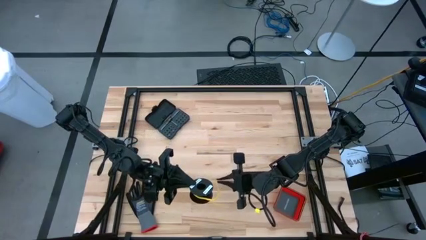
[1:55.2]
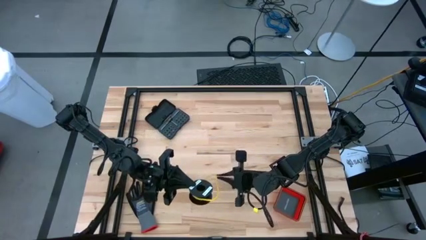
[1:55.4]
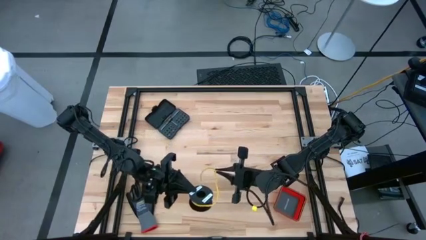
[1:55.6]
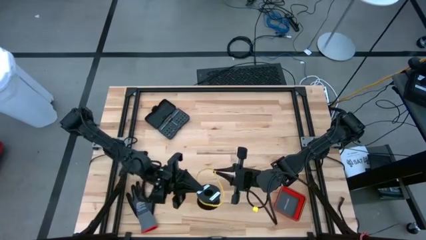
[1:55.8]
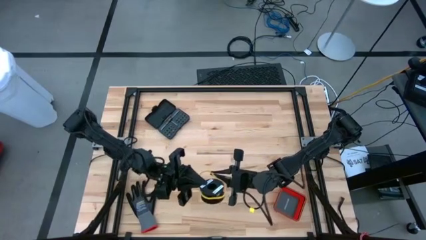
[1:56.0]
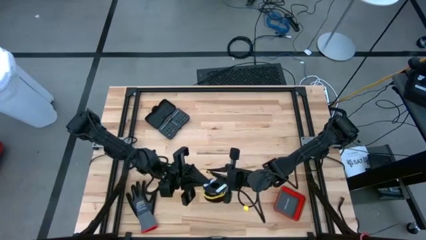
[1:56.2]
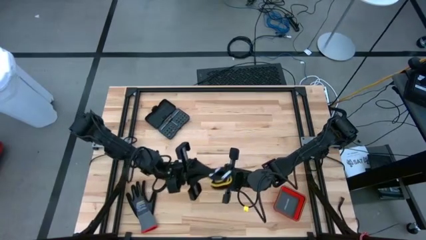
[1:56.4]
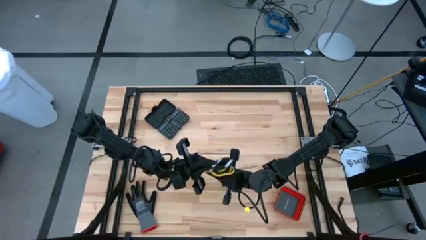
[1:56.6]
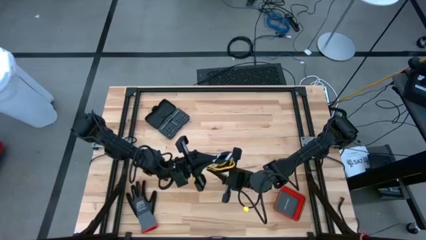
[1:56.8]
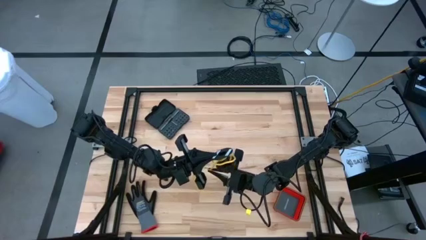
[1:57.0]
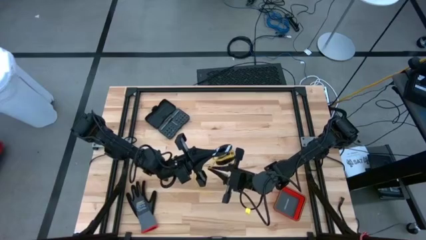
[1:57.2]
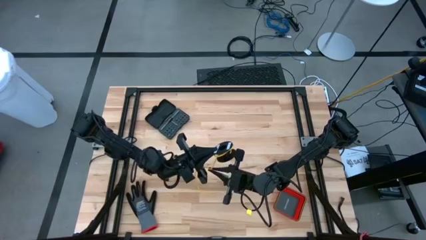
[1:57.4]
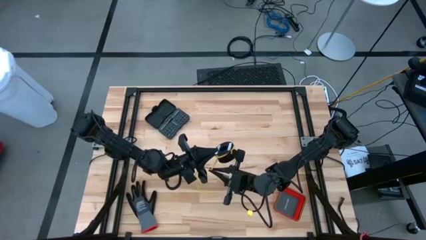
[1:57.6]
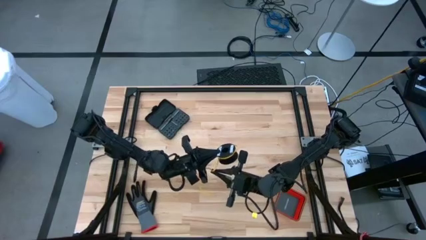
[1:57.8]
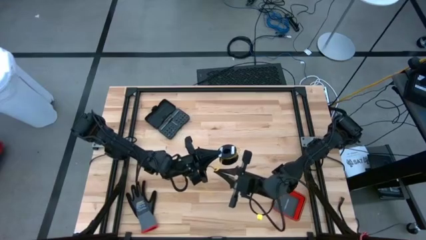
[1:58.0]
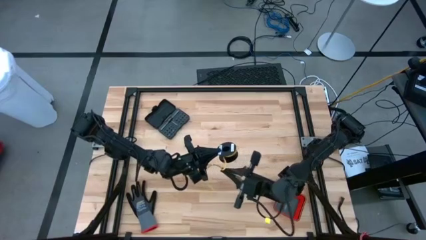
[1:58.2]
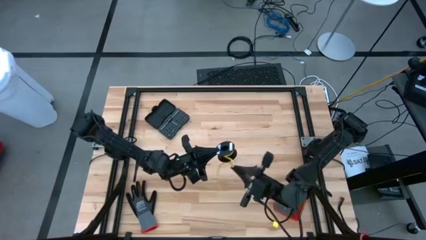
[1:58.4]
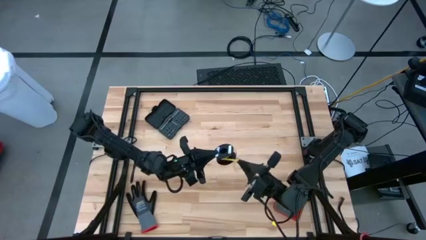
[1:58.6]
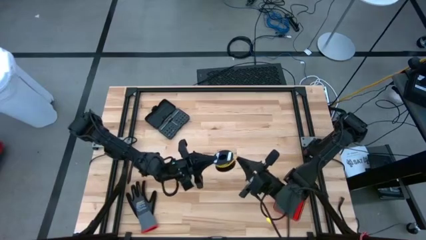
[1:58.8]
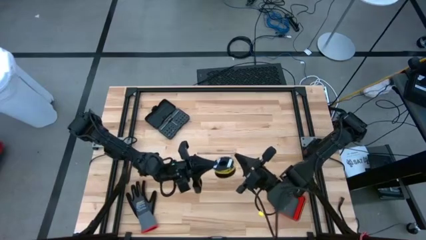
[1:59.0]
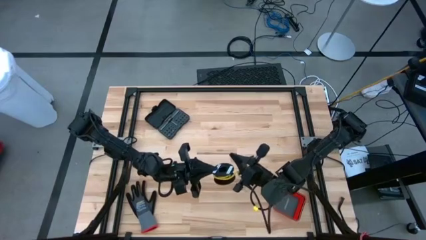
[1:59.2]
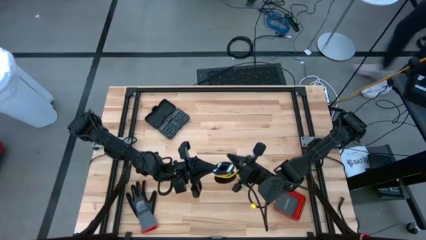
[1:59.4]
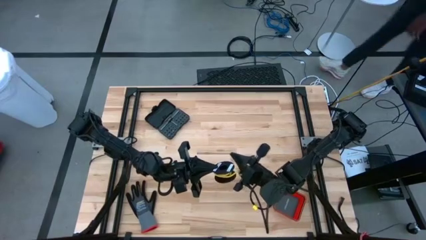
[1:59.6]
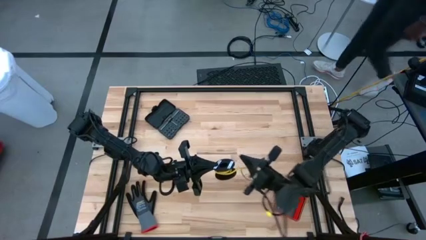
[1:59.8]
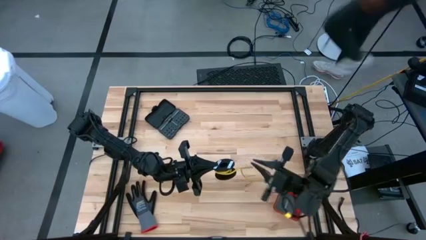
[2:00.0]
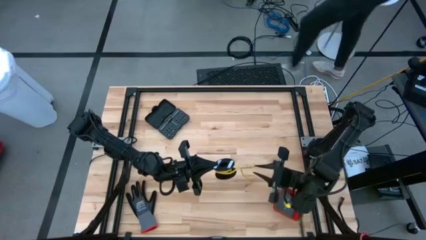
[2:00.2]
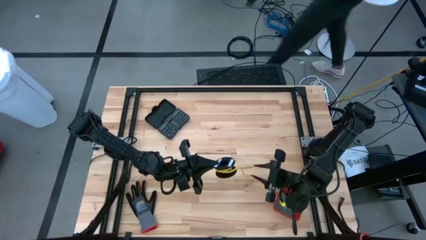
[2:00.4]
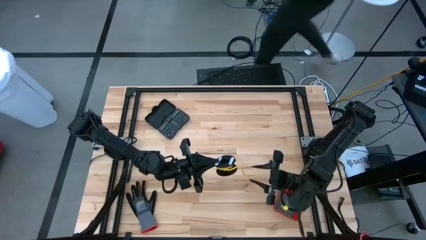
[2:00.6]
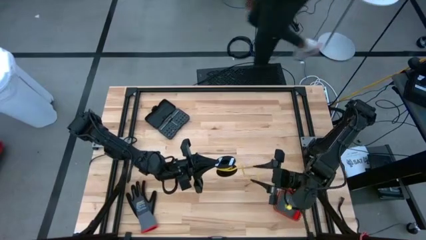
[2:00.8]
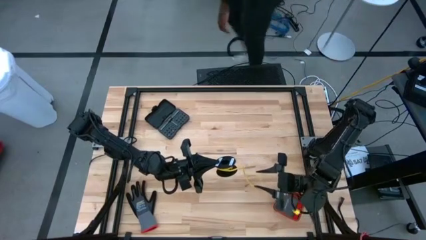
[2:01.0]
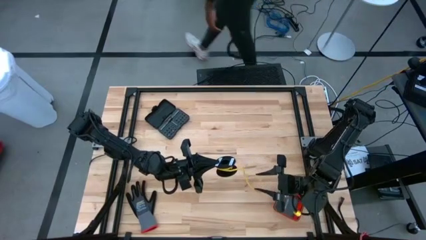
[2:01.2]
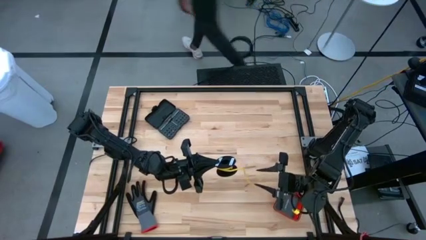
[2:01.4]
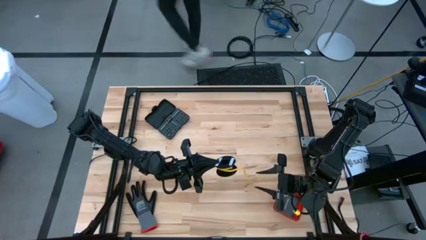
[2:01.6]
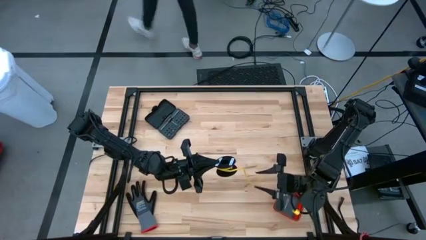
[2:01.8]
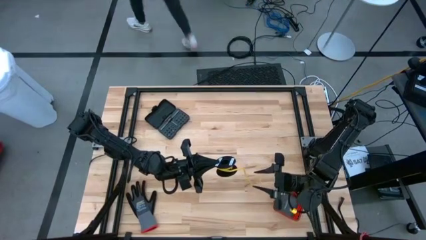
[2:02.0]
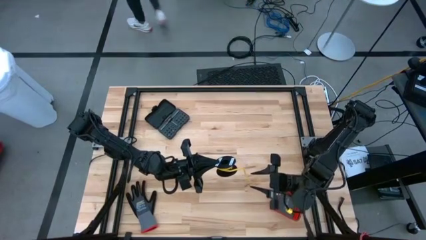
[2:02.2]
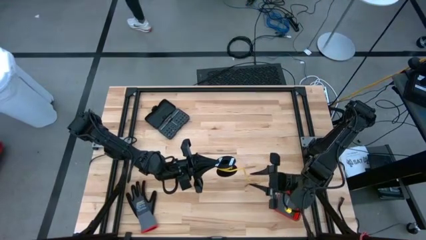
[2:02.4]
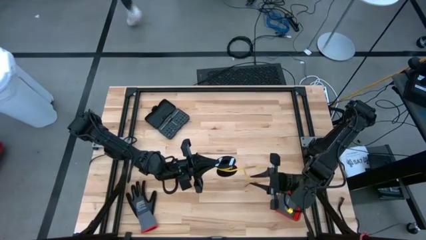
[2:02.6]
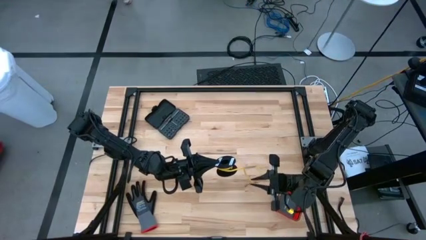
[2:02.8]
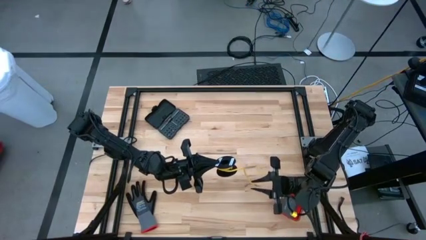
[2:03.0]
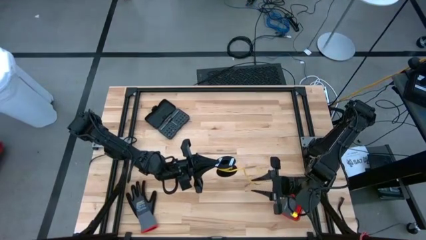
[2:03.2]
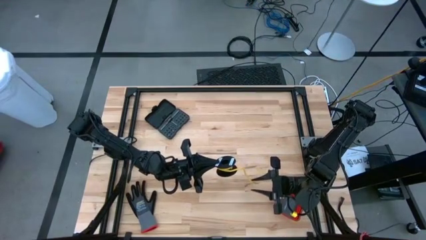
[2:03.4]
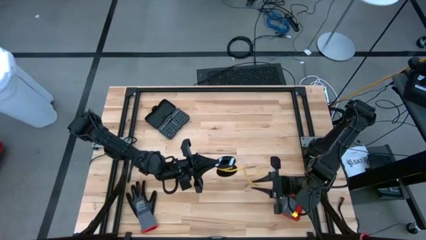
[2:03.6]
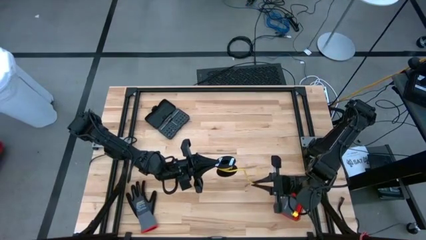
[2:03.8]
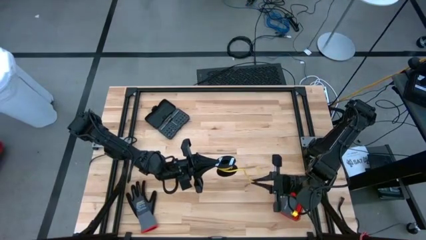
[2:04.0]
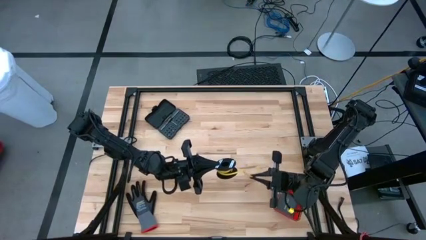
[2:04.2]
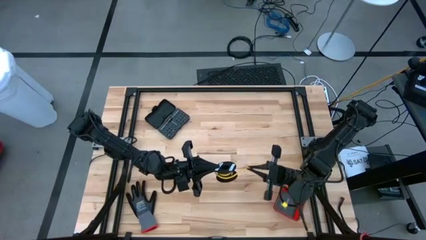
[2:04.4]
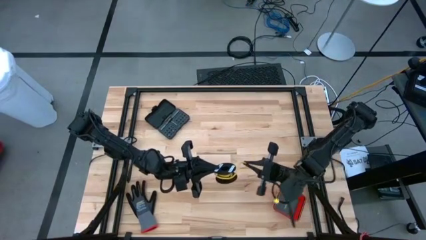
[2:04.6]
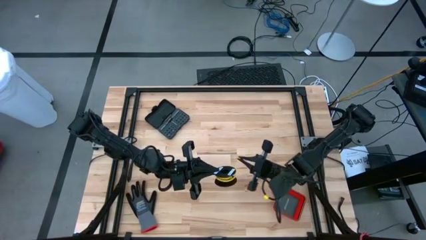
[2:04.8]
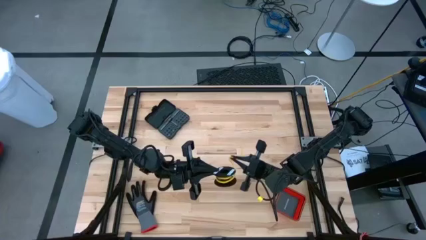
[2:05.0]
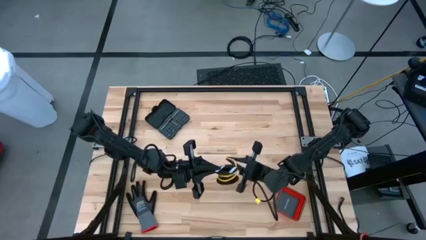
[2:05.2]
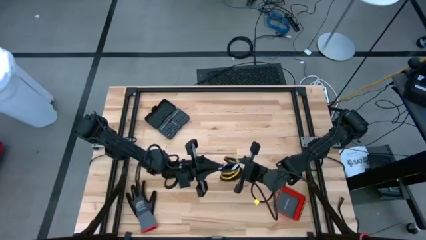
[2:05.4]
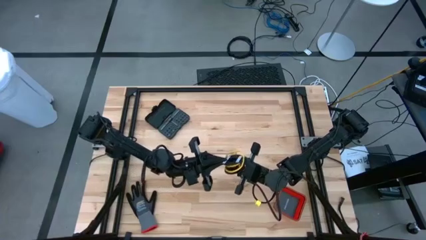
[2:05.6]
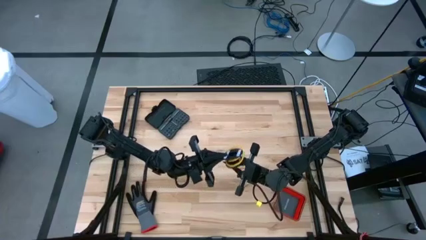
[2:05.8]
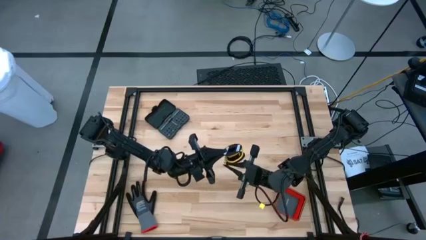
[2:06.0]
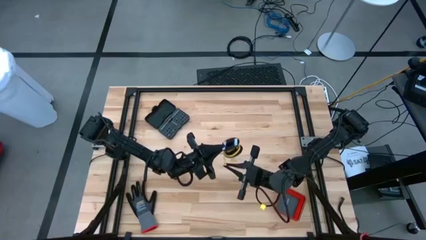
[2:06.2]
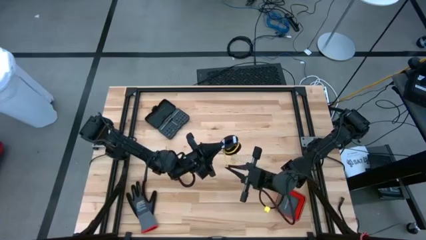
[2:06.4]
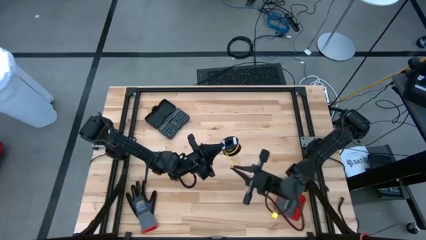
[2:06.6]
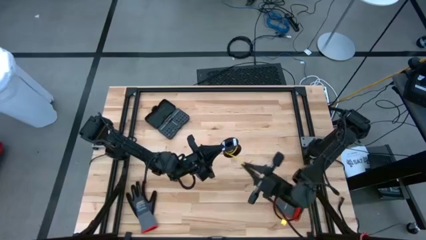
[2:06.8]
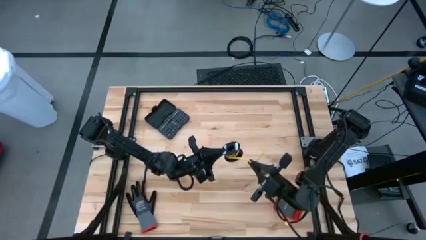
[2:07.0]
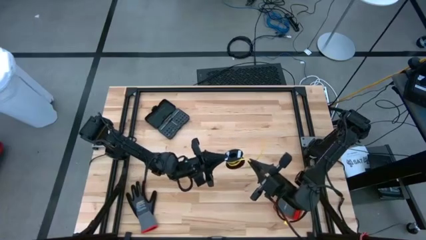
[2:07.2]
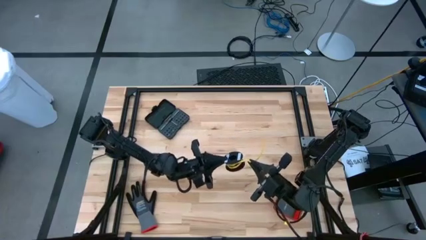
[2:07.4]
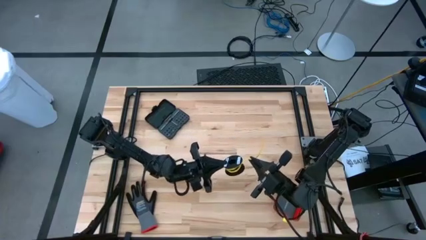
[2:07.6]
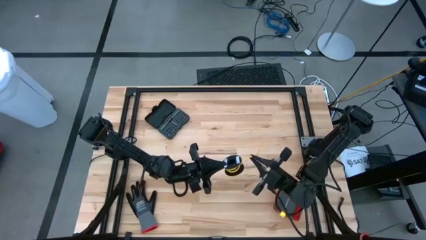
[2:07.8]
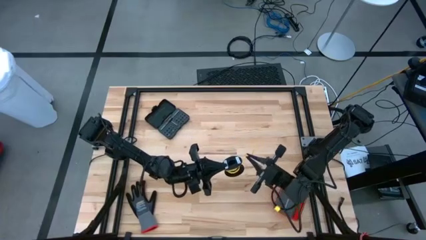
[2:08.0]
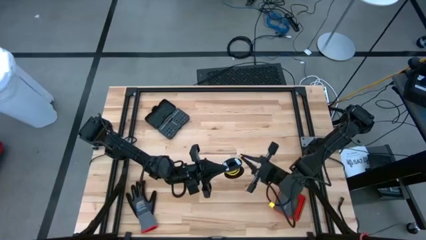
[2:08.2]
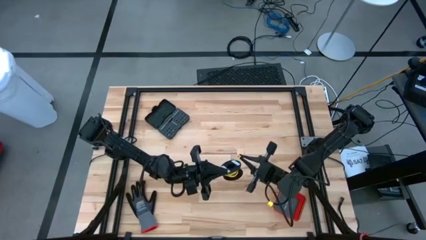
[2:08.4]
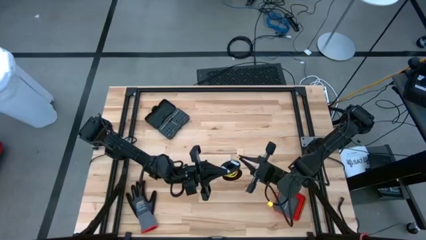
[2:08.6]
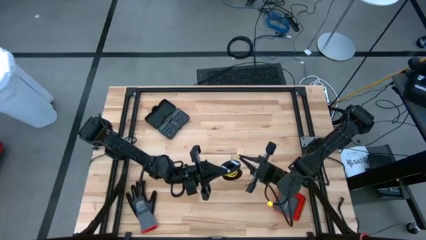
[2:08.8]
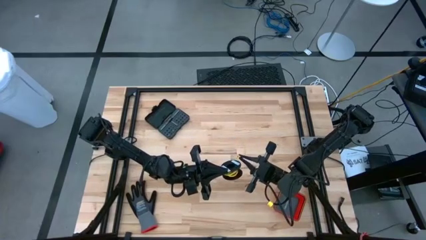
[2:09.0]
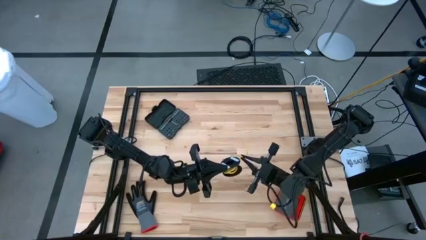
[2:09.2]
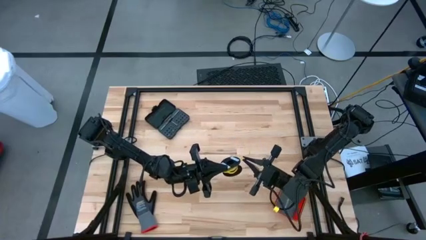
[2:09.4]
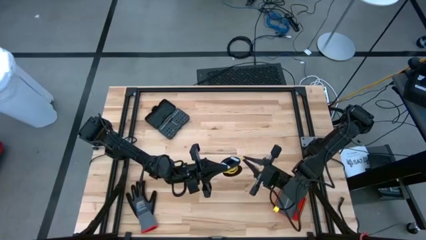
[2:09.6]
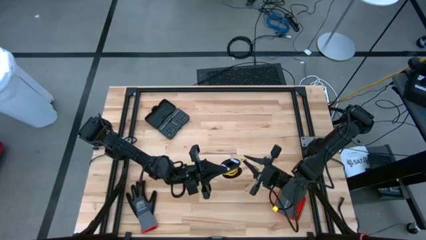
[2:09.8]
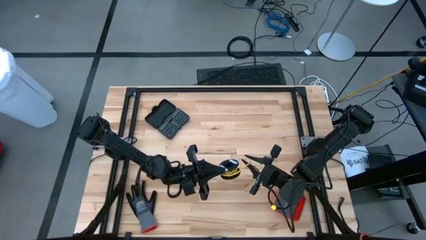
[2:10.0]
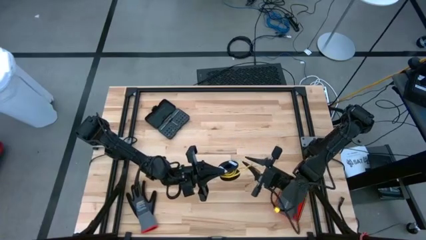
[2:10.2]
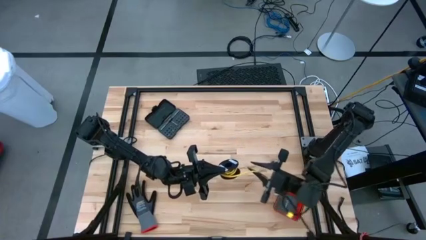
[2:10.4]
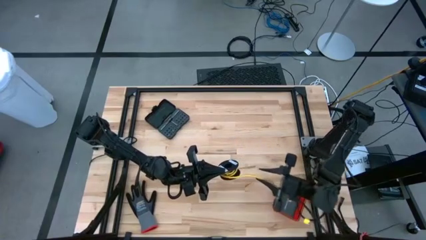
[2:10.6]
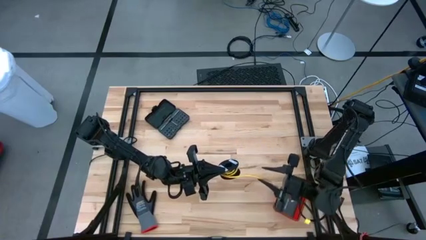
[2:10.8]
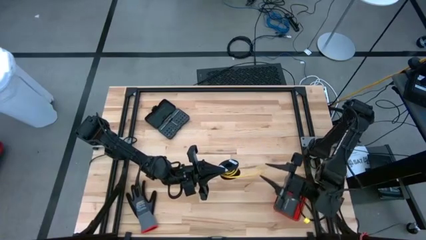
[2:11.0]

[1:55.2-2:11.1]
Task: Coil cords
Coil the yellow wire onto the spool
